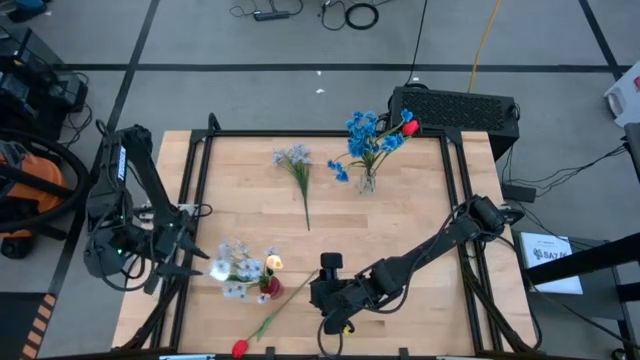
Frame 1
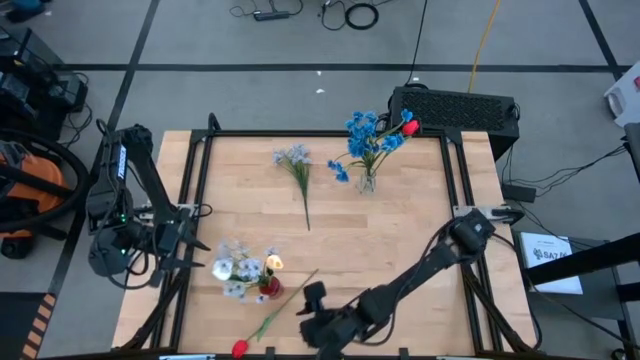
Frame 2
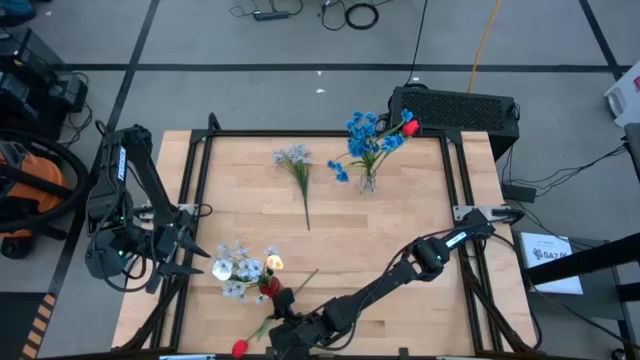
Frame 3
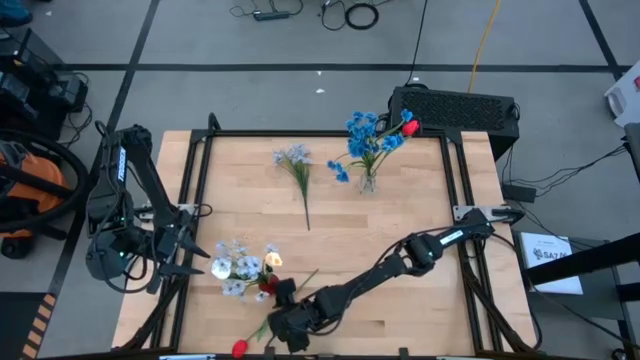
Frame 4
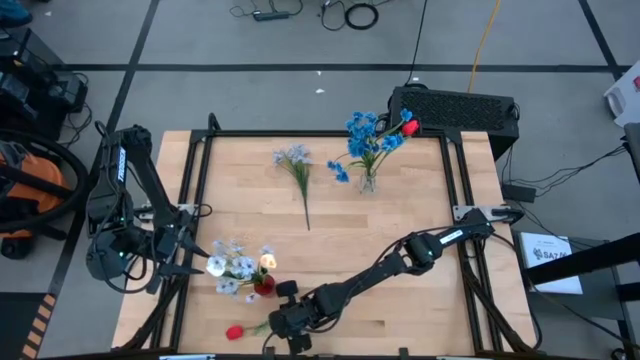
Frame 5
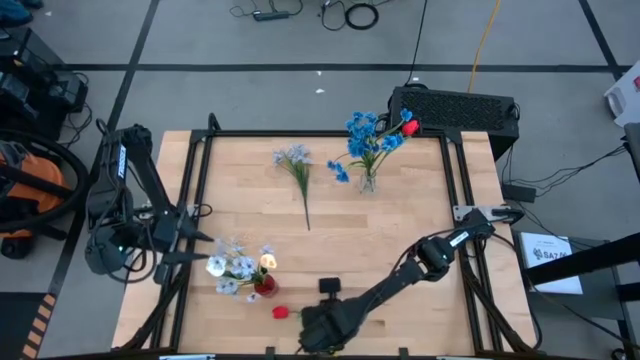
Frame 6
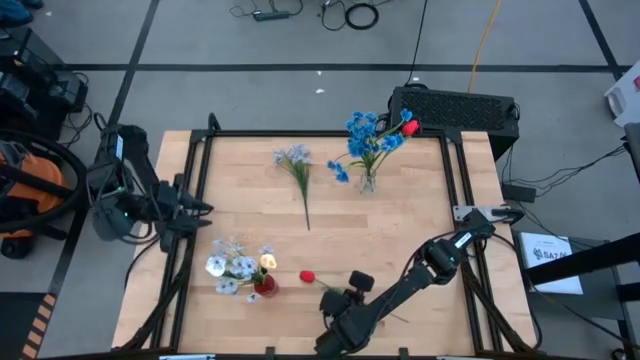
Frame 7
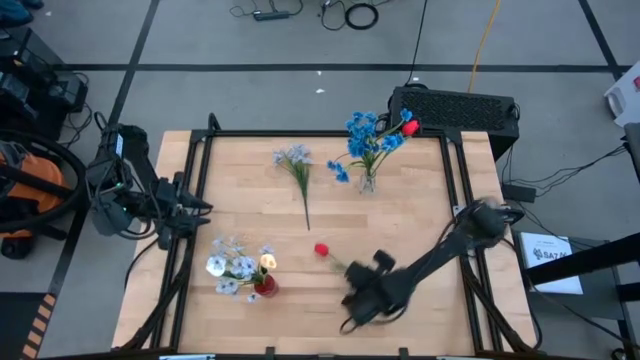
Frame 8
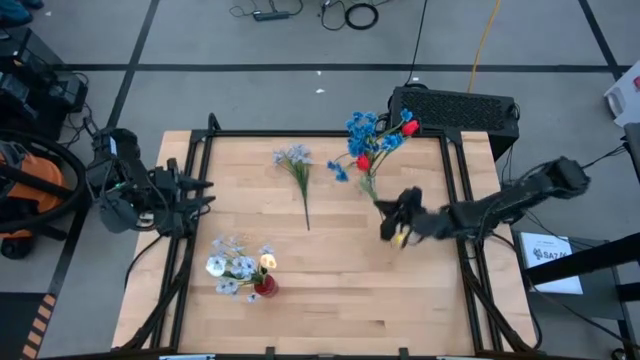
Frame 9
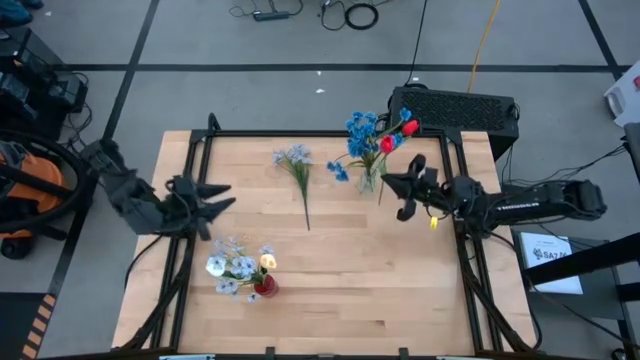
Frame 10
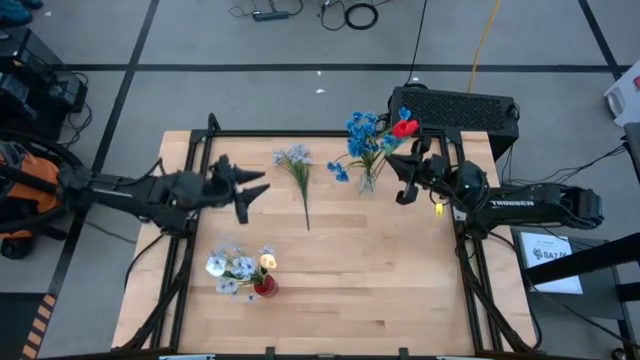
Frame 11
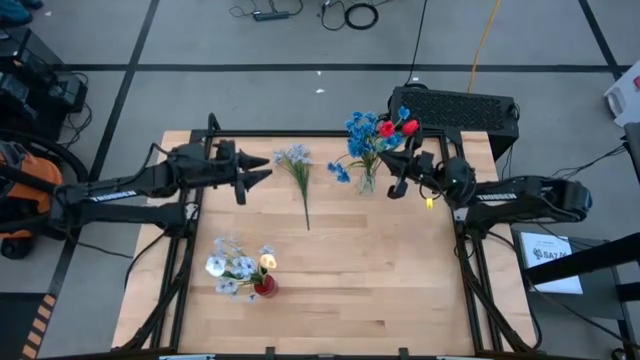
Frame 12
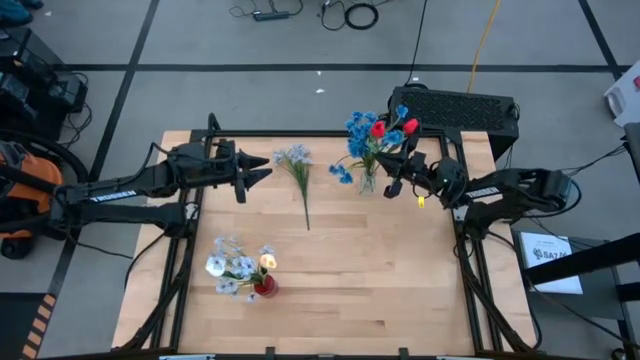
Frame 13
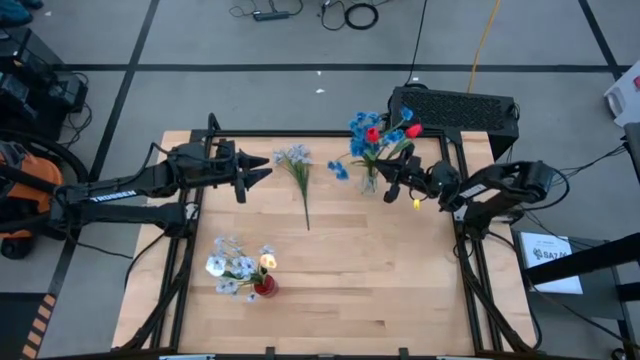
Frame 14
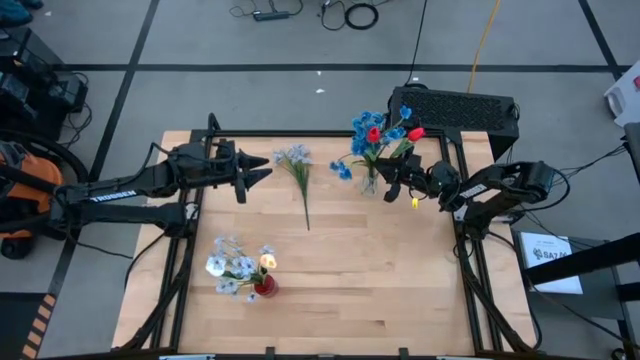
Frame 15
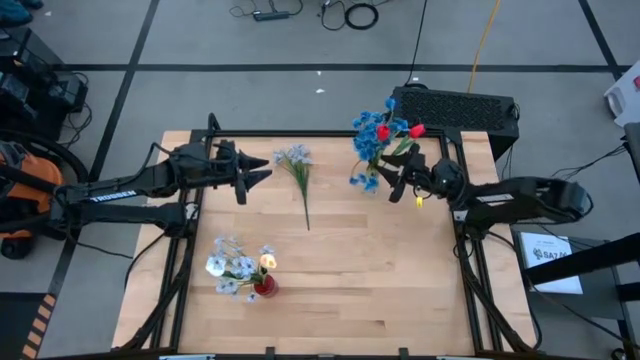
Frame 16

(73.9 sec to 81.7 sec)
Task: Sort flowers into vase by color
Put the red flower into the transparent vase

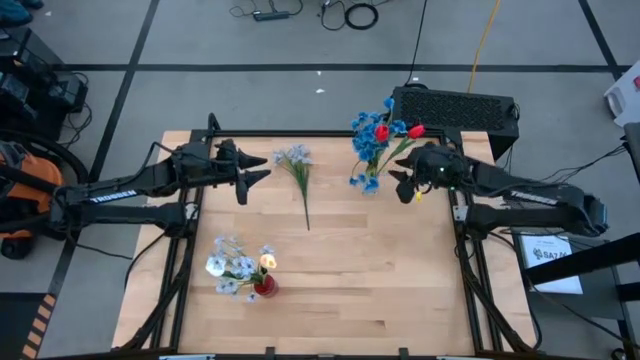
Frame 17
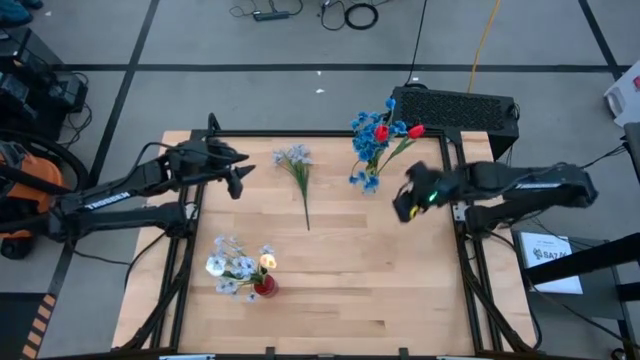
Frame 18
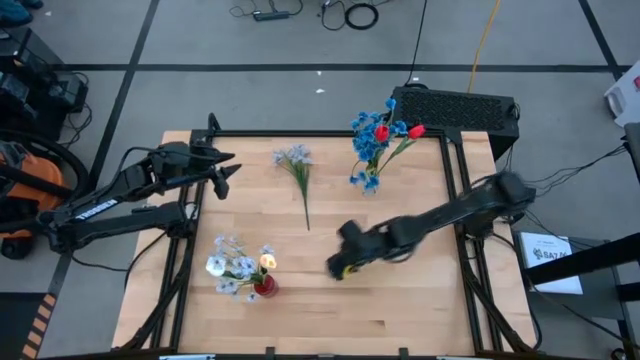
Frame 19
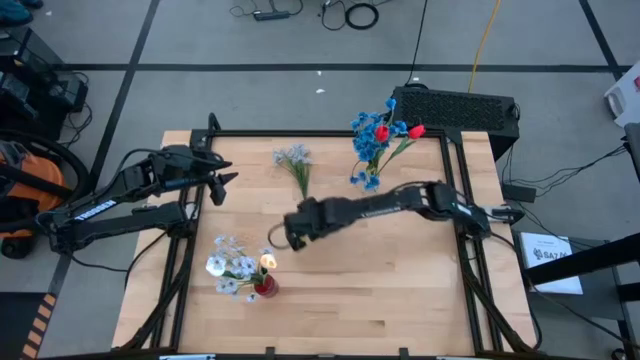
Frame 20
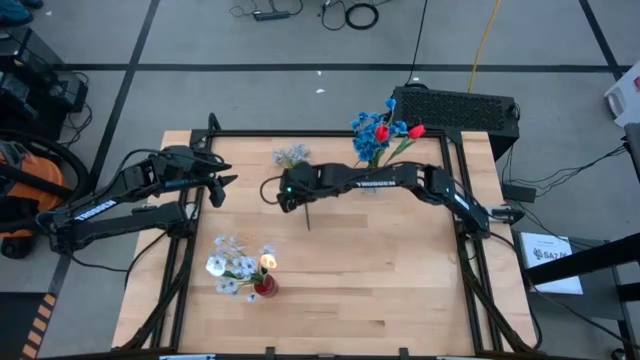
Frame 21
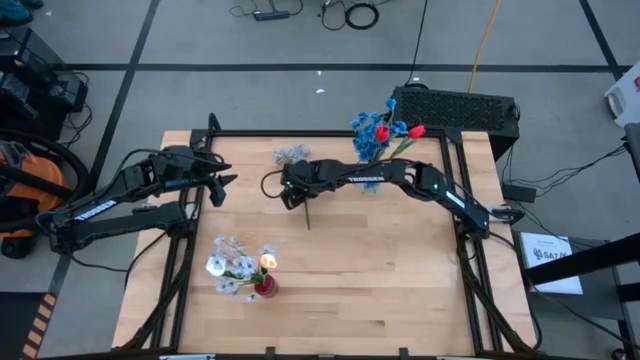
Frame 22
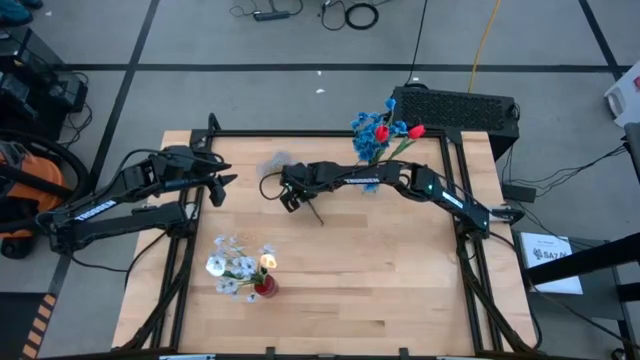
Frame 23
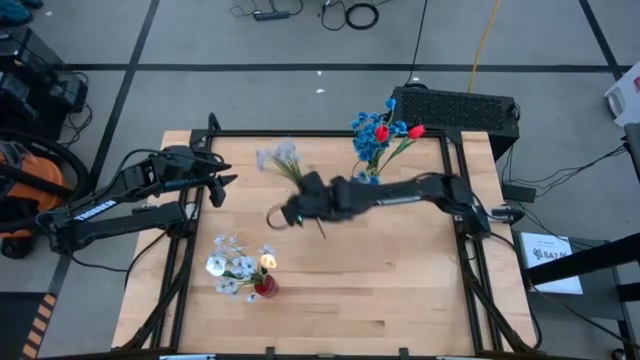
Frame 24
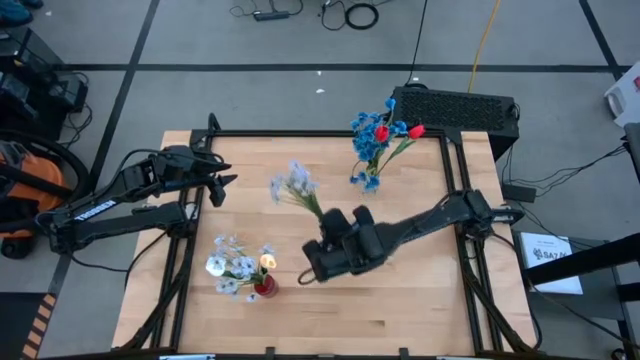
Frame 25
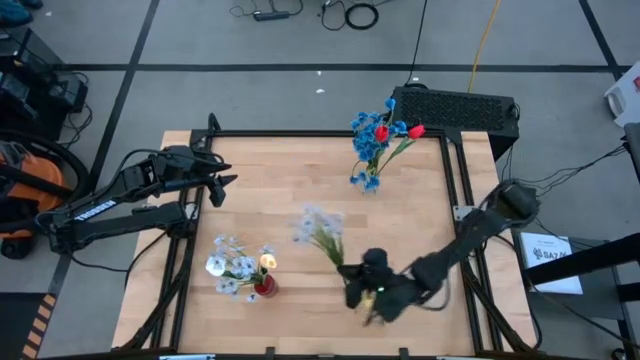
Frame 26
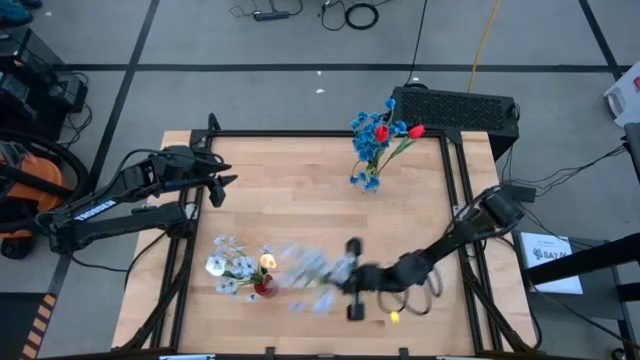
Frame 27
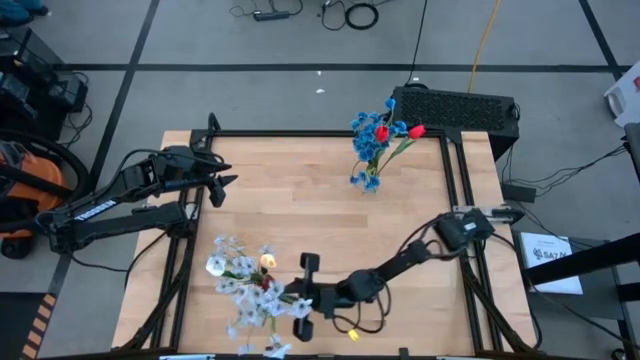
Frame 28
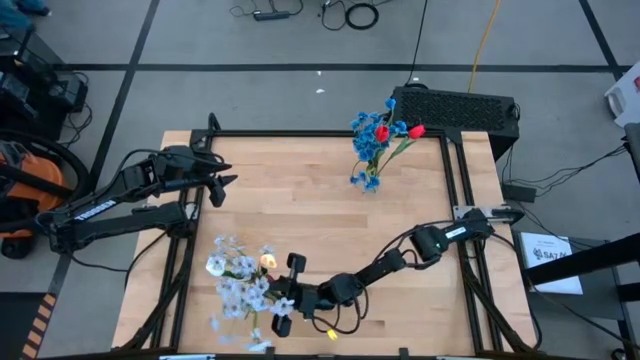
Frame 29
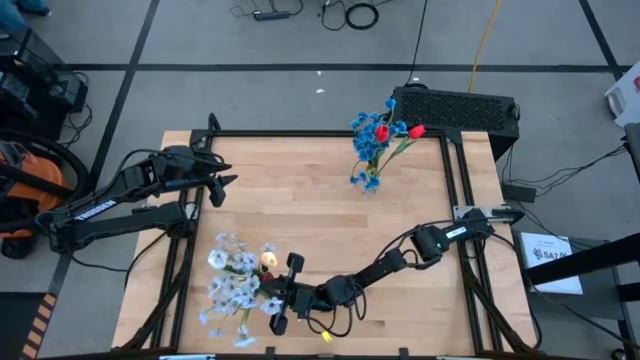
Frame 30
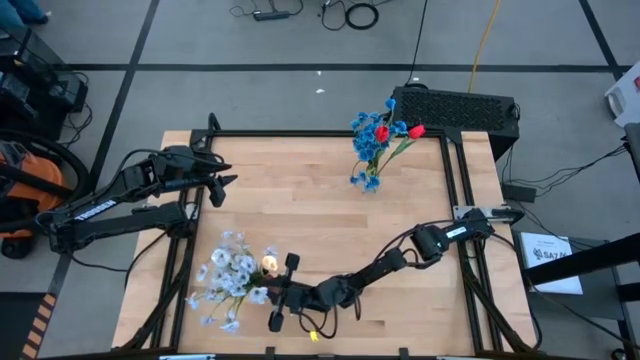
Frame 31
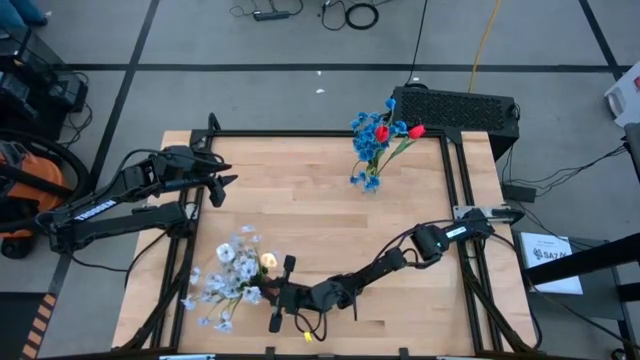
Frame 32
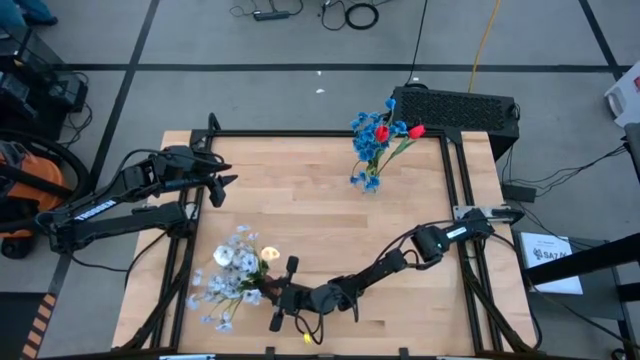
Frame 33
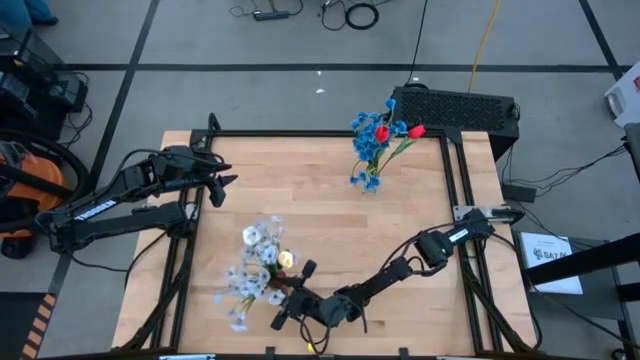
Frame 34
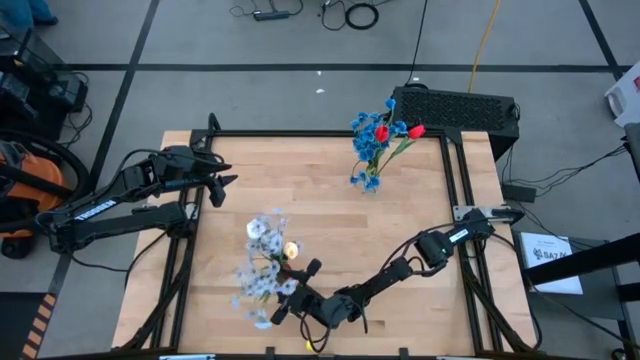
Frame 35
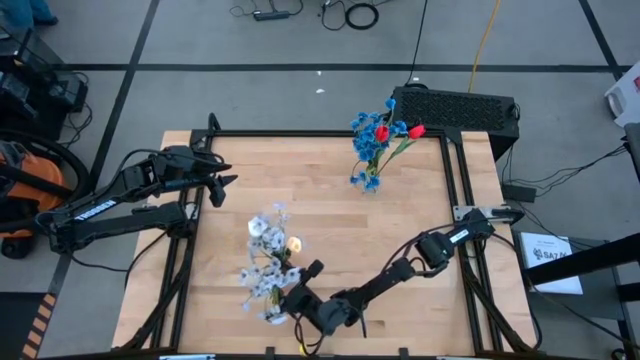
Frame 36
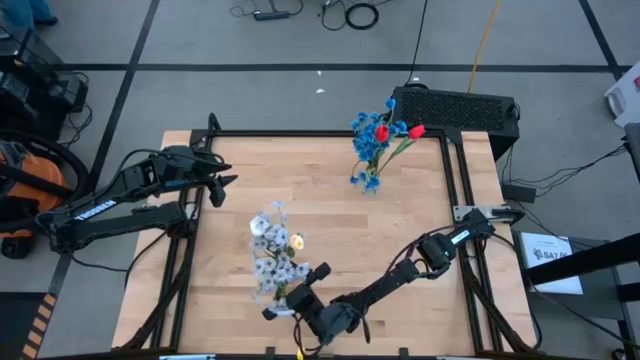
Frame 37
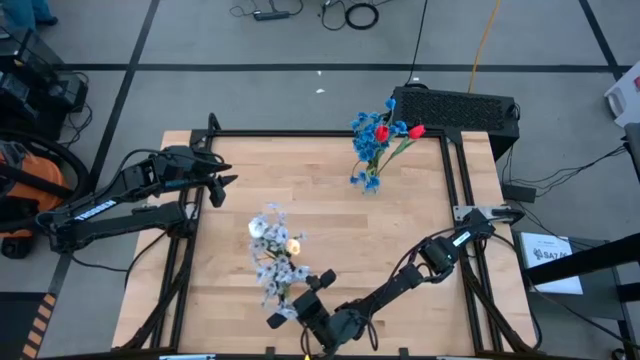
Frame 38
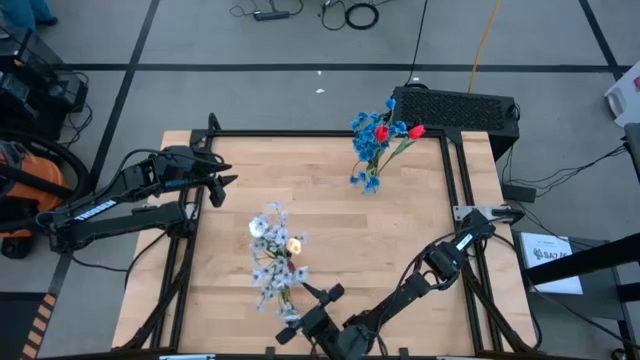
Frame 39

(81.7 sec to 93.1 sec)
Put the white flower into the red vase
